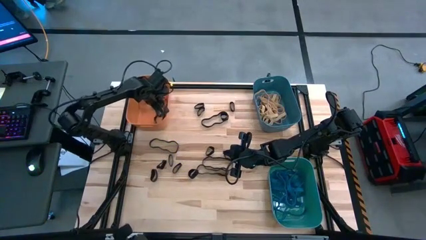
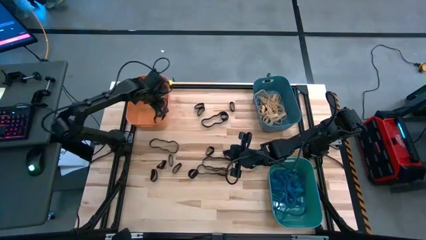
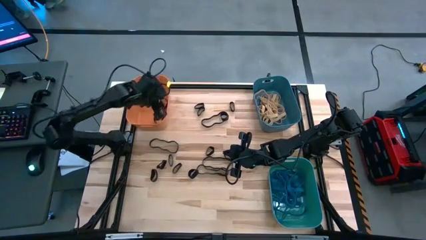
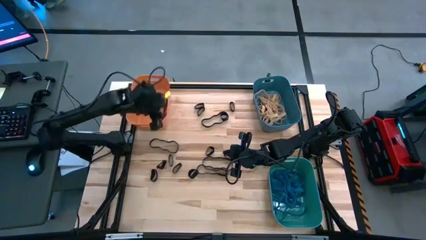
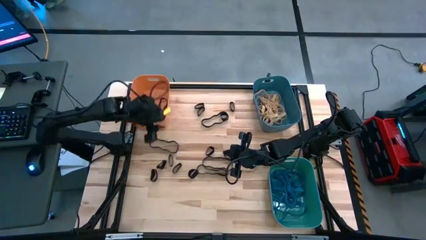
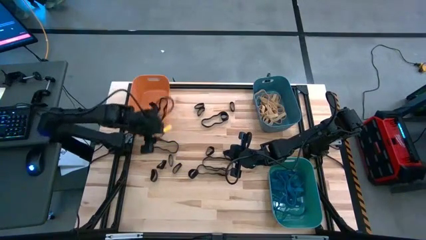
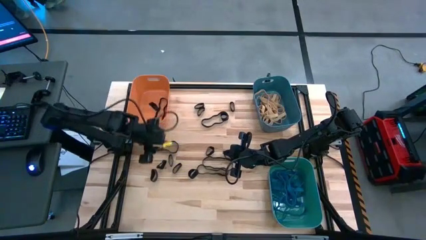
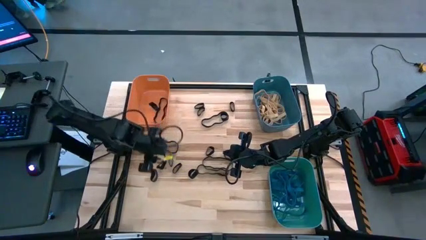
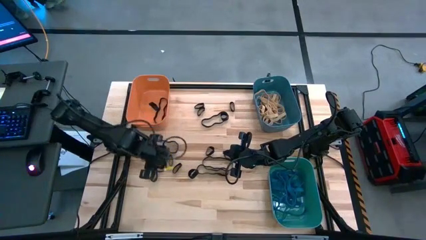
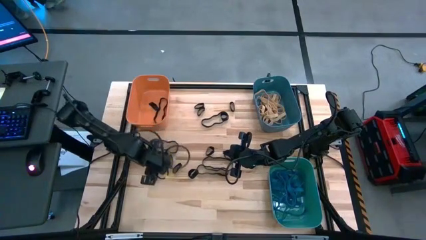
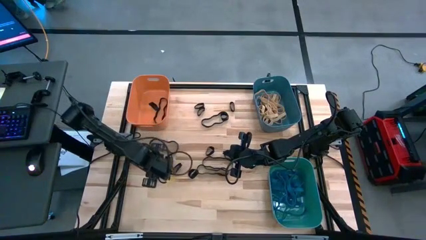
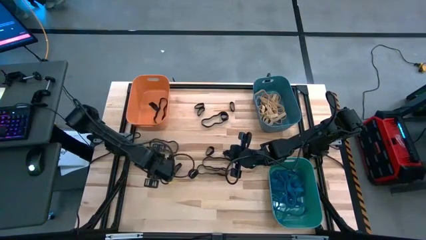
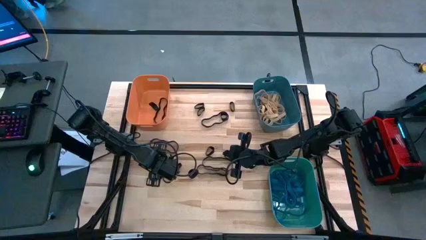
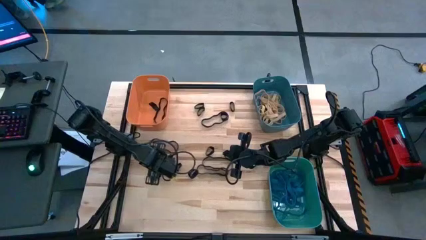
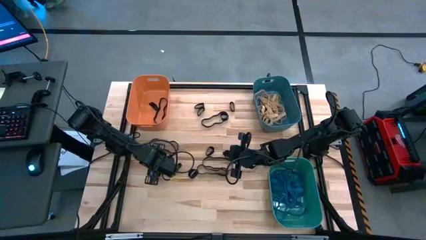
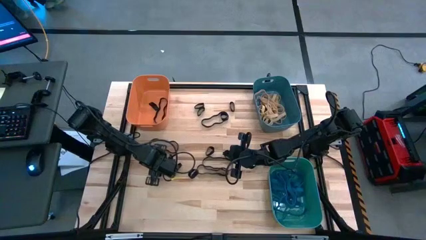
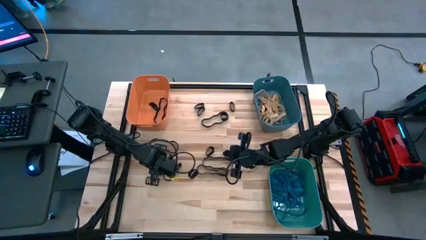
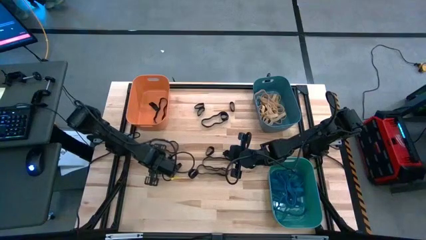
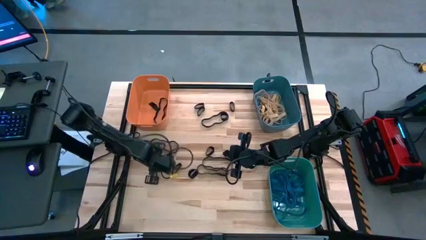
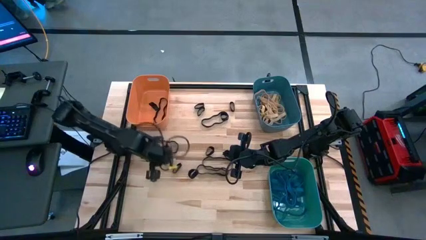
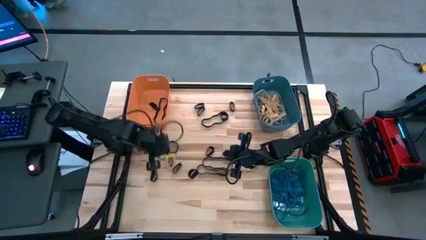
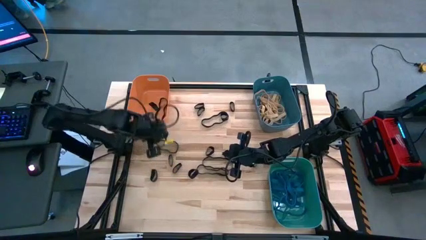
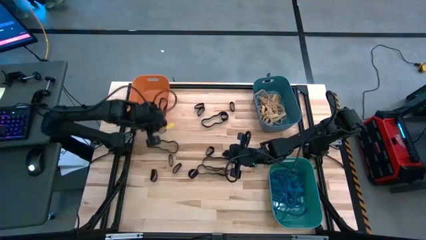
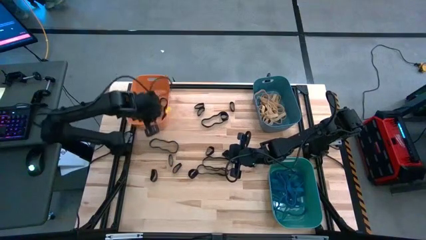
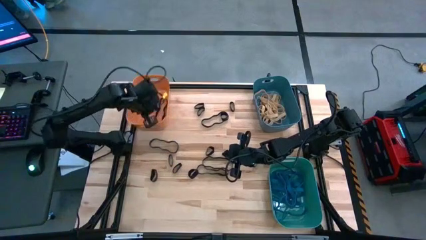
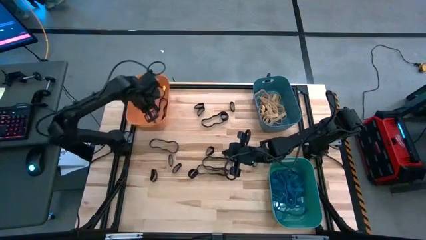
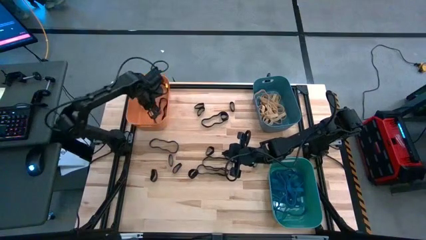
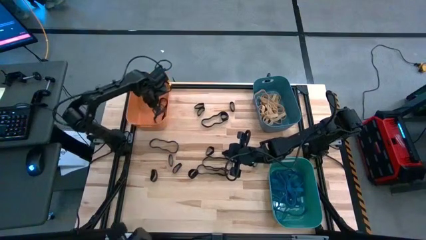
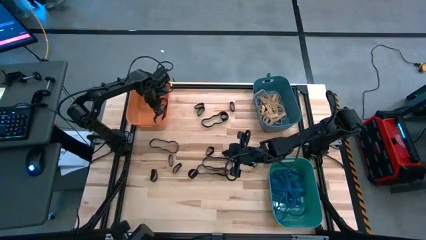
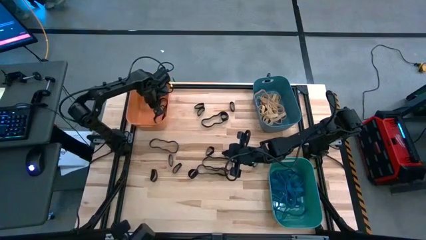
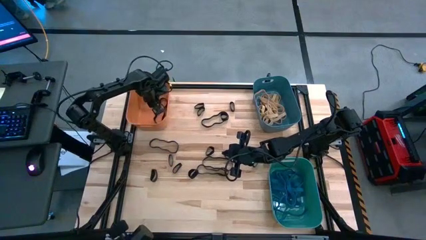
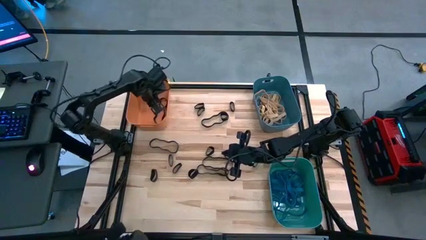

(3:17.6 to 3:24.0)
Task: Sort rubber bands into baskets
Put the black rubber band into the orange bin

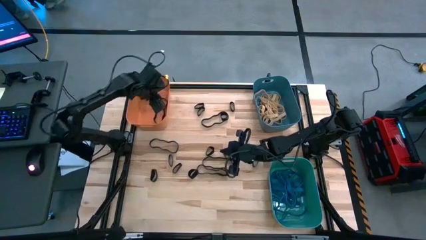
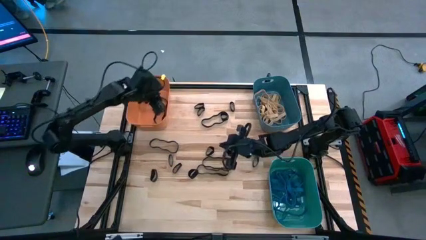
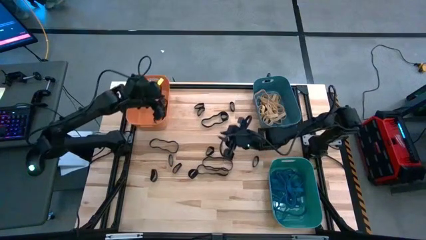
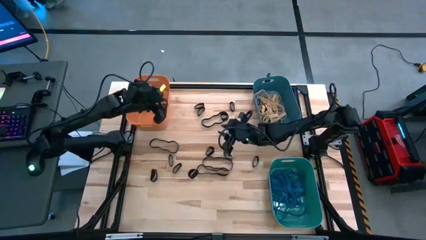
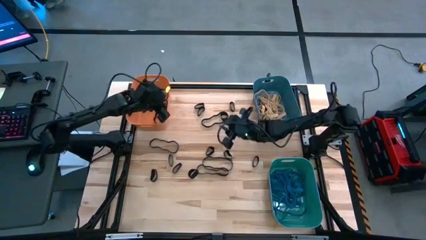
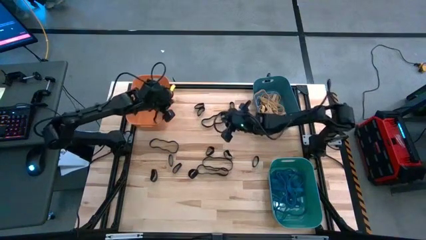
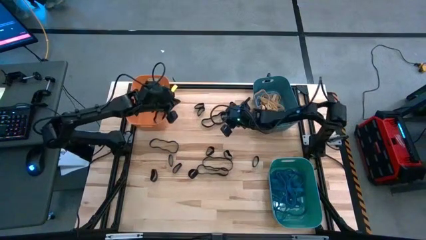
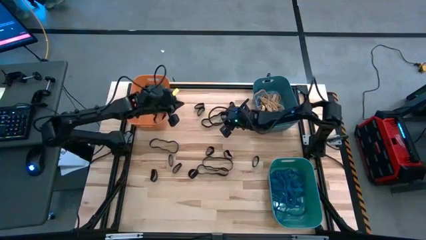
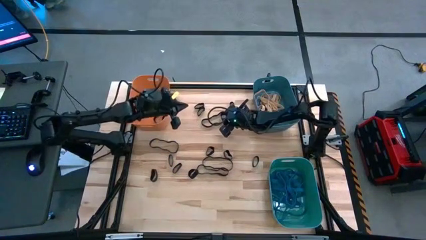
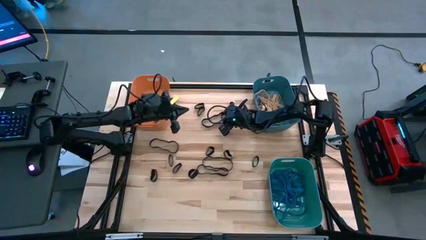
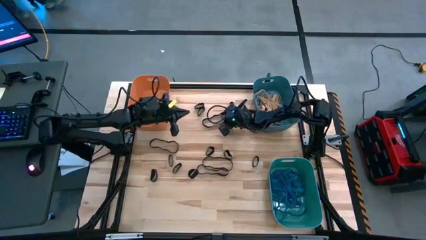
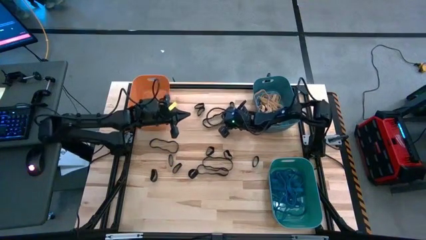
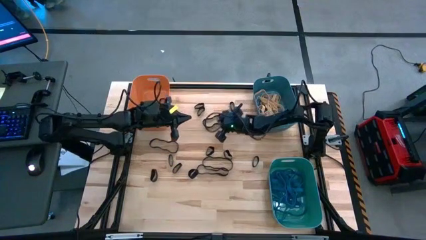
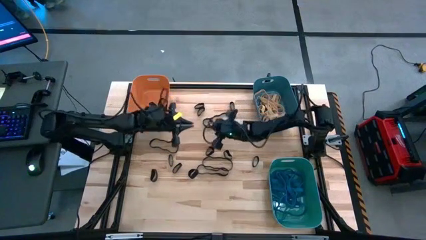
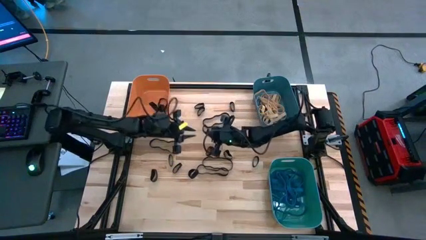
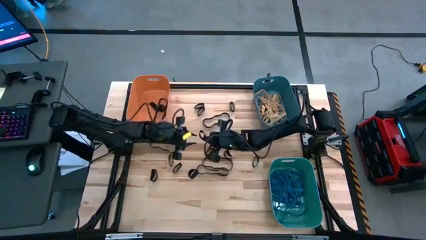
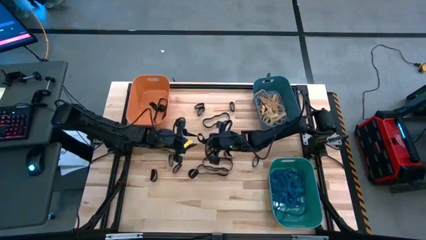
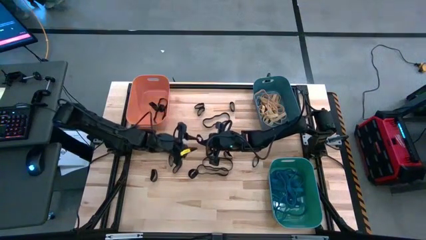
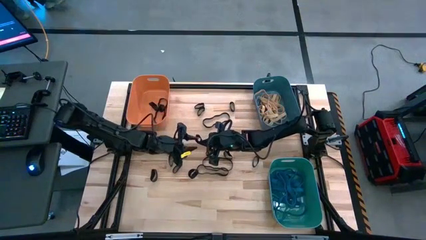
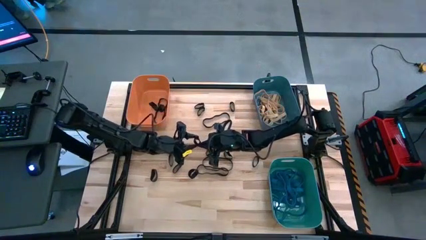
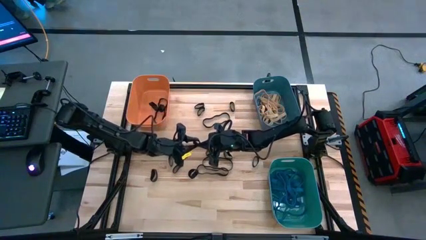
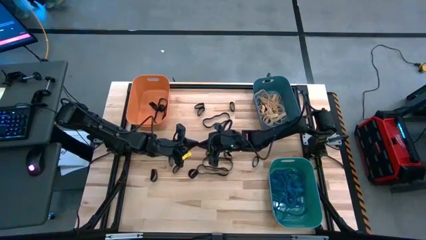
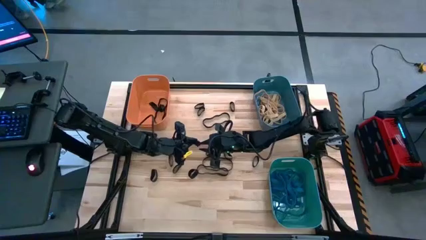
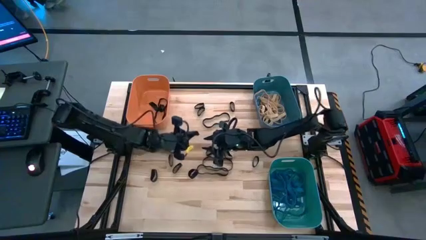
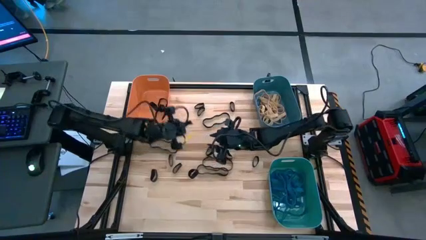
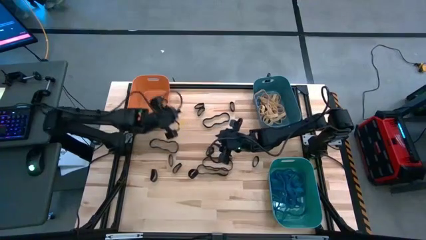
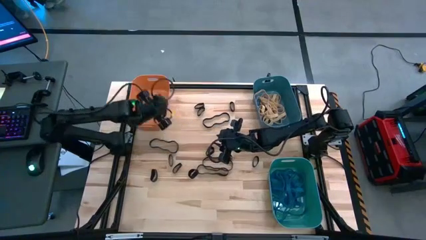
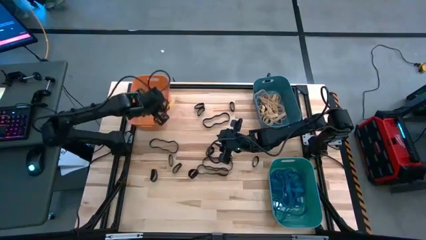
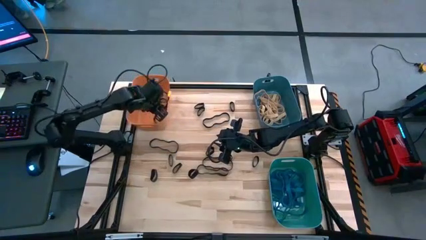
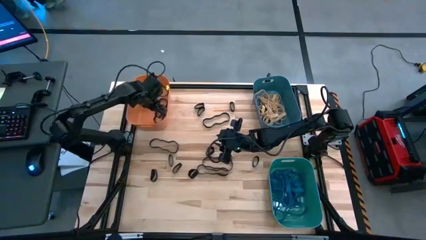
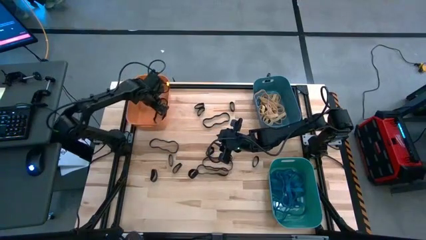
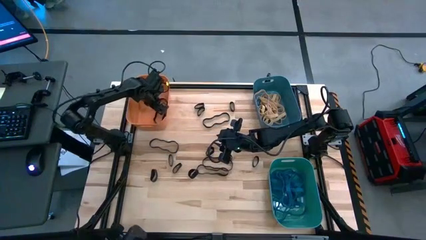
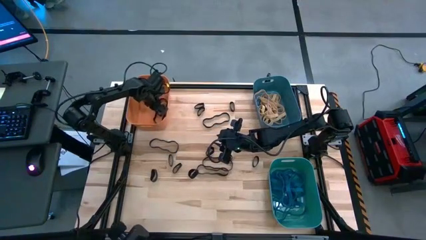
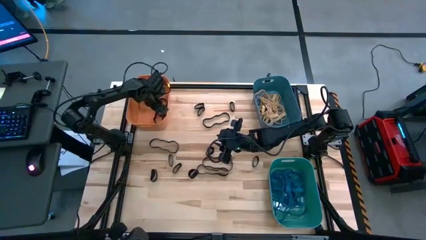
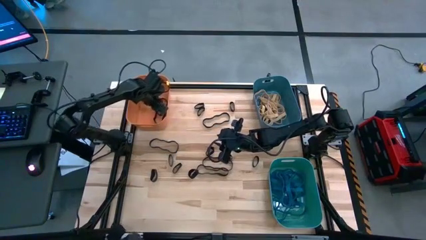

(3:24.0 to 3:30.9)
Put the black rubber band into the orange bin

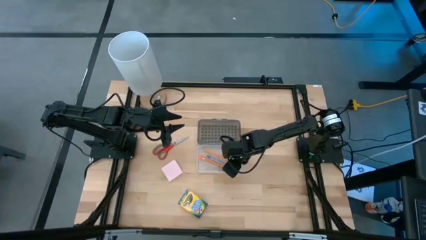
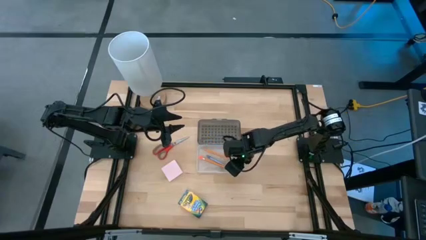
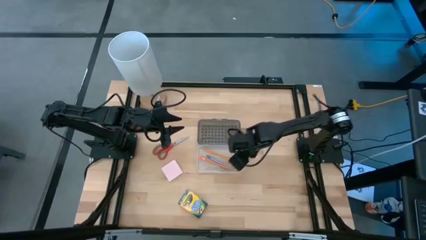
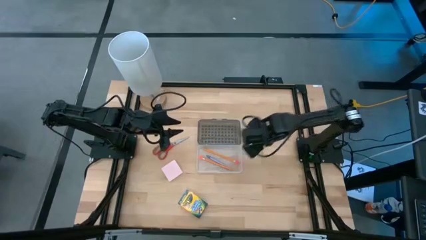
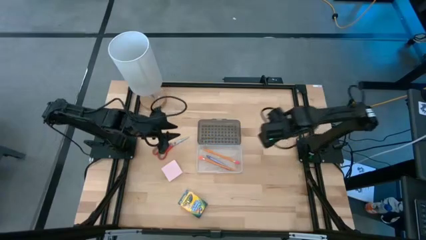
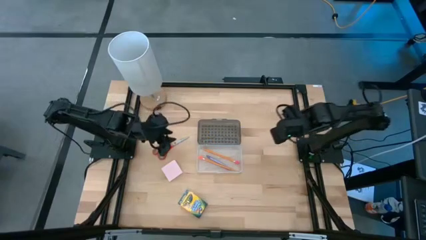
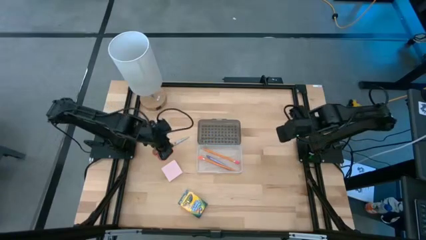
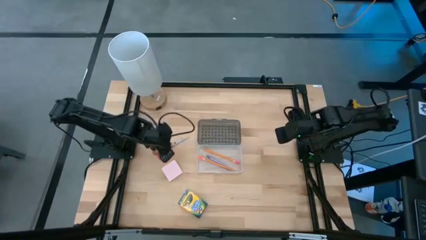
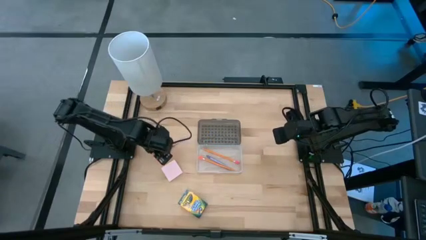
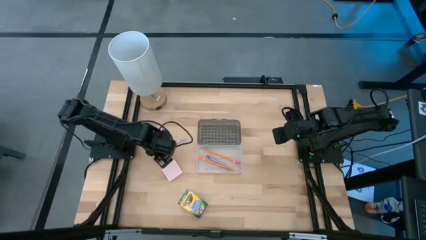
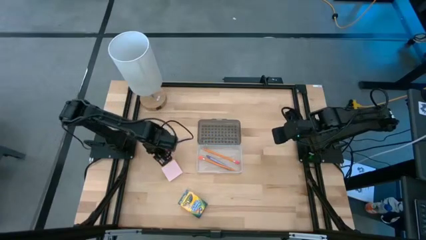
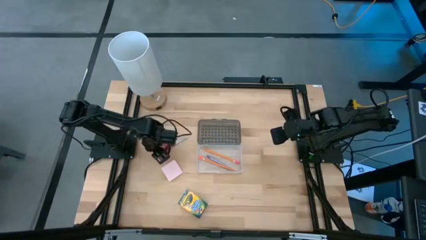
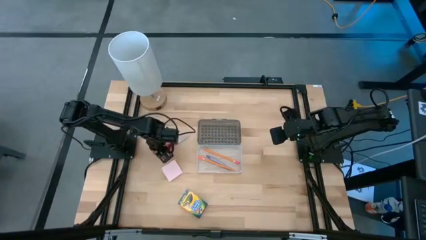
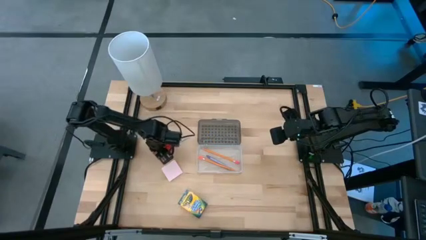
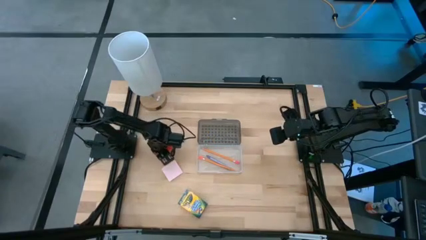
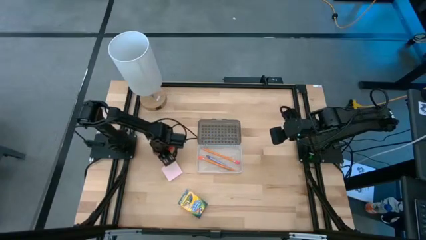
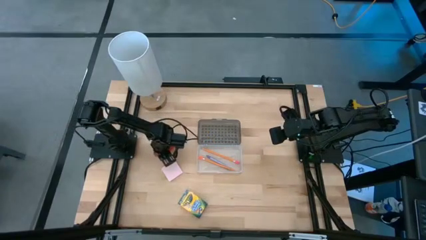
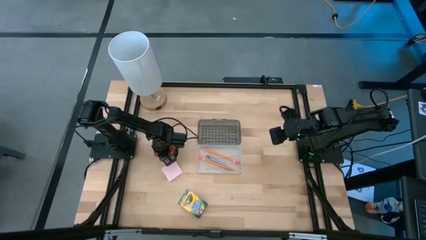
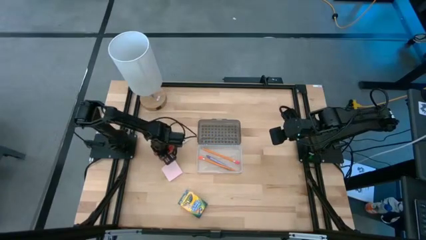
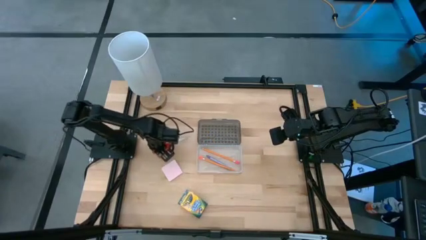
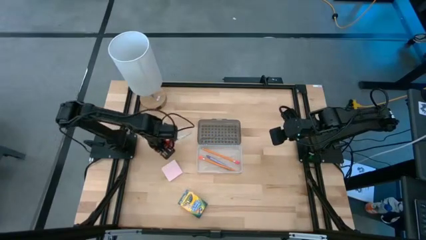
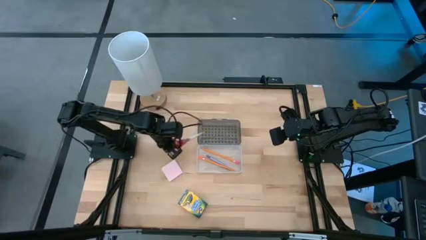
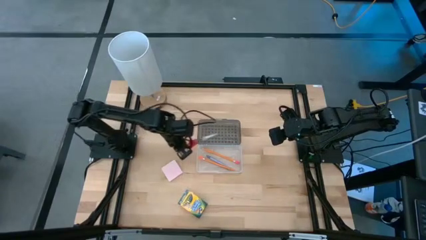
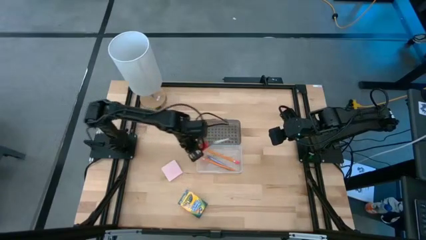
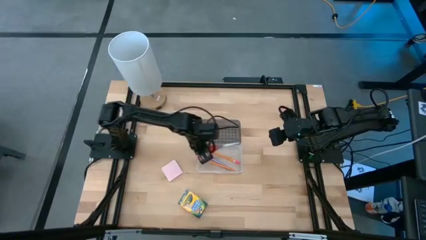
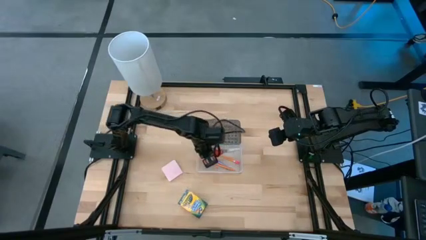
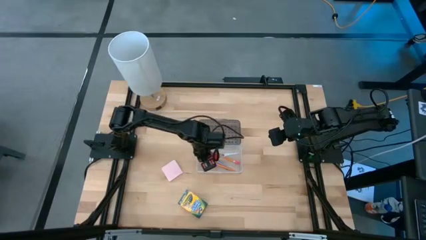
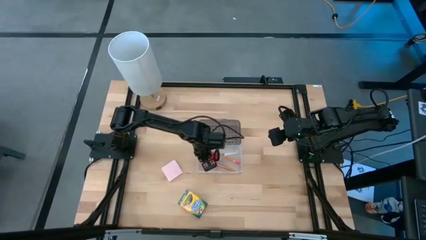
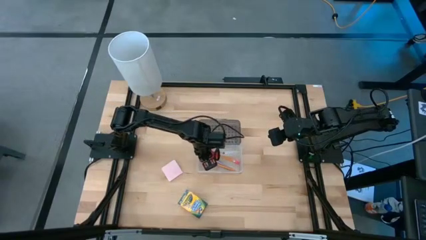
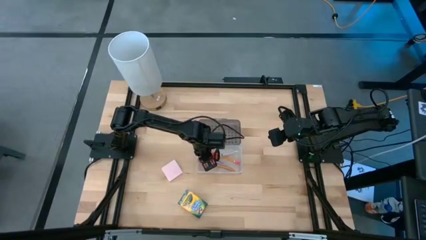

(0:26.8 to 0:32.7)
Task: Pack school essentials
Put the red scissors into the transparent supply box
